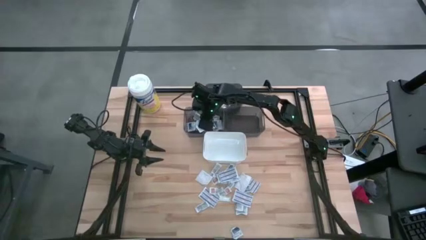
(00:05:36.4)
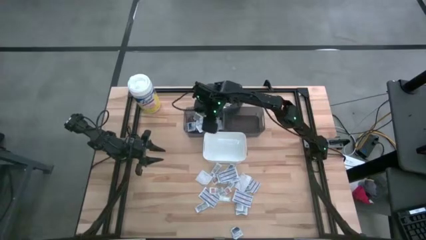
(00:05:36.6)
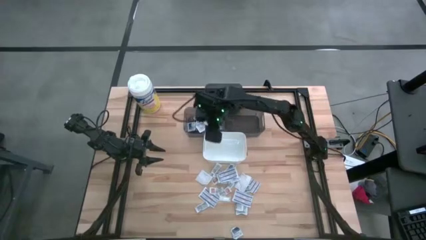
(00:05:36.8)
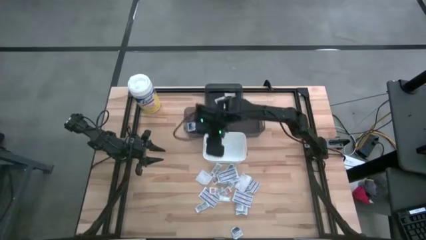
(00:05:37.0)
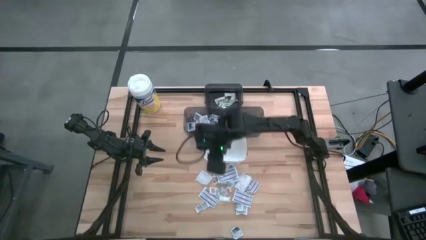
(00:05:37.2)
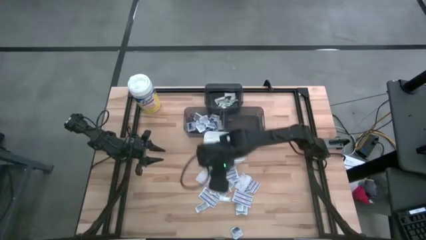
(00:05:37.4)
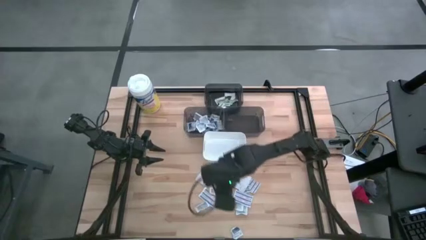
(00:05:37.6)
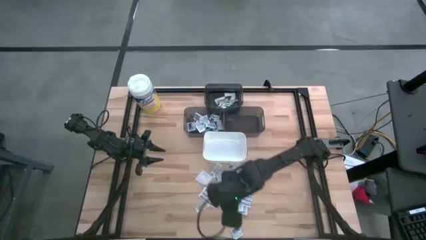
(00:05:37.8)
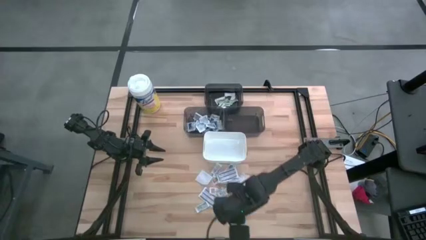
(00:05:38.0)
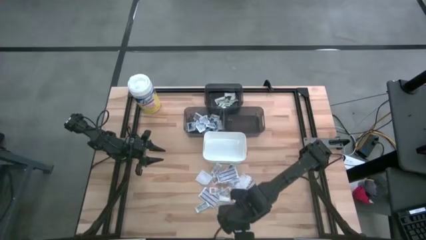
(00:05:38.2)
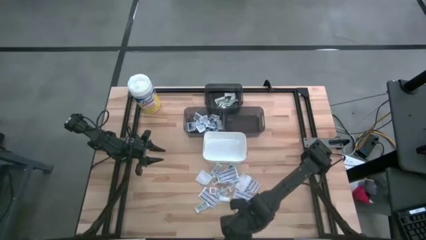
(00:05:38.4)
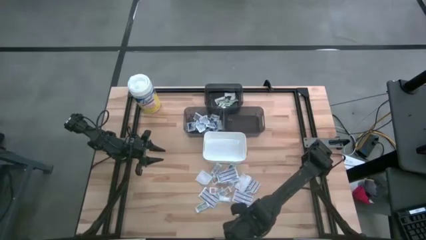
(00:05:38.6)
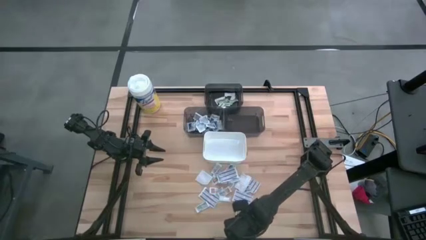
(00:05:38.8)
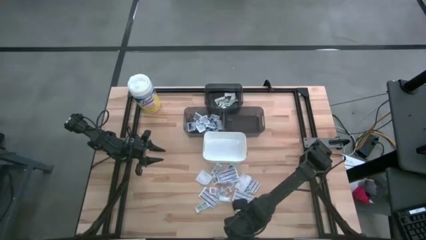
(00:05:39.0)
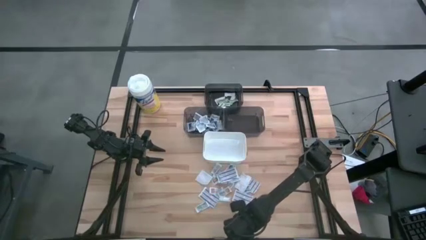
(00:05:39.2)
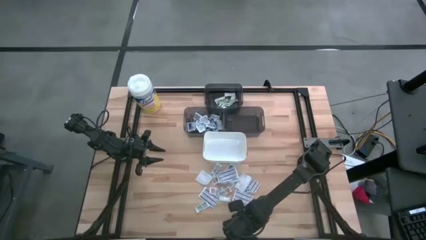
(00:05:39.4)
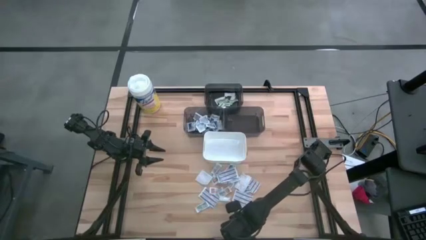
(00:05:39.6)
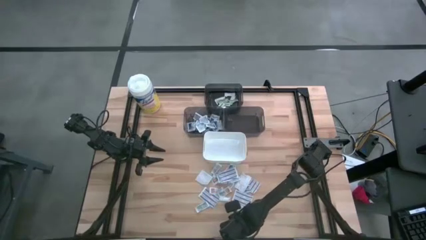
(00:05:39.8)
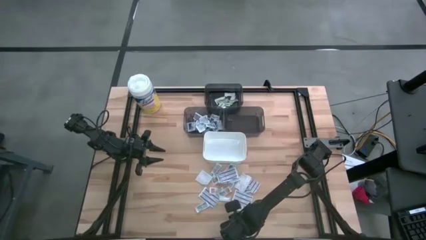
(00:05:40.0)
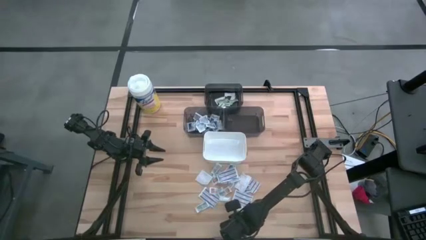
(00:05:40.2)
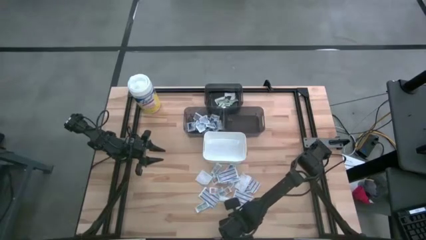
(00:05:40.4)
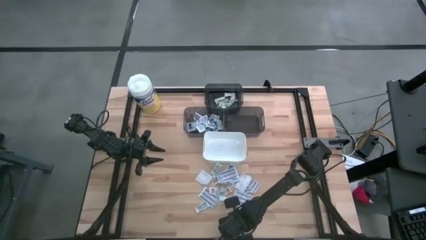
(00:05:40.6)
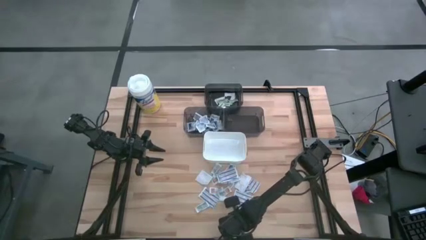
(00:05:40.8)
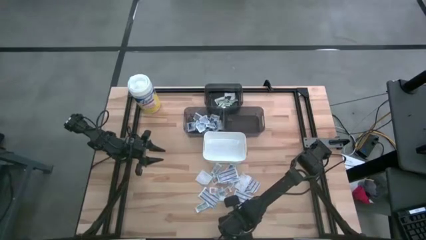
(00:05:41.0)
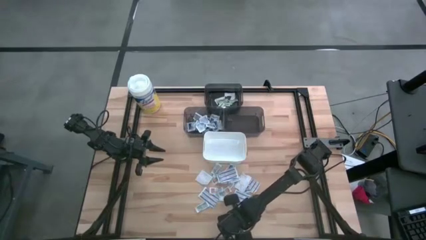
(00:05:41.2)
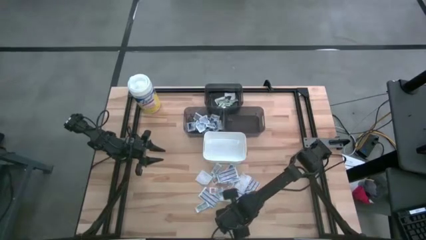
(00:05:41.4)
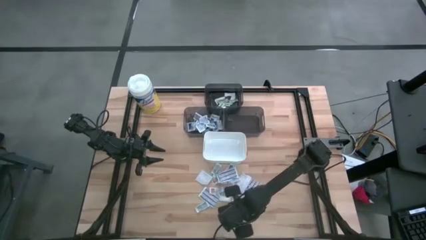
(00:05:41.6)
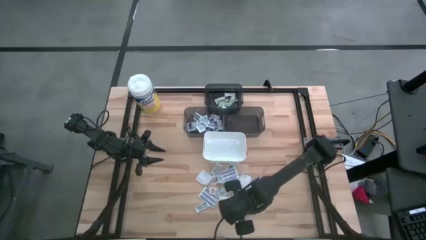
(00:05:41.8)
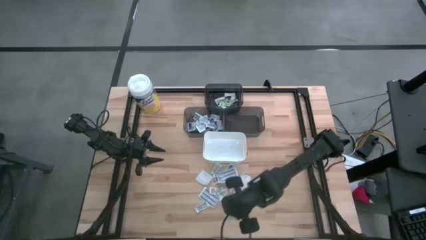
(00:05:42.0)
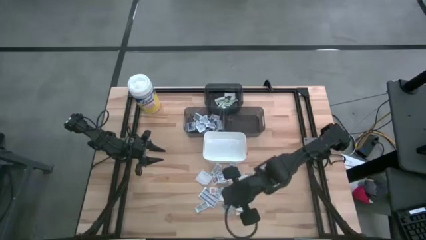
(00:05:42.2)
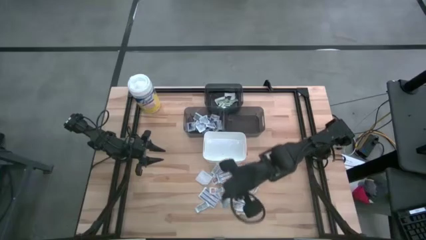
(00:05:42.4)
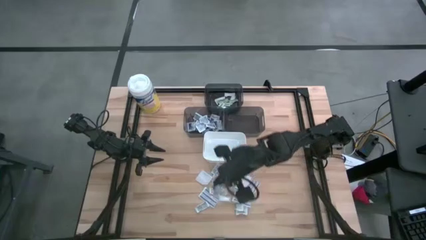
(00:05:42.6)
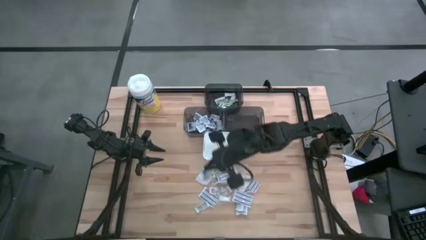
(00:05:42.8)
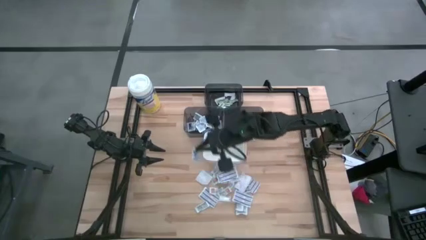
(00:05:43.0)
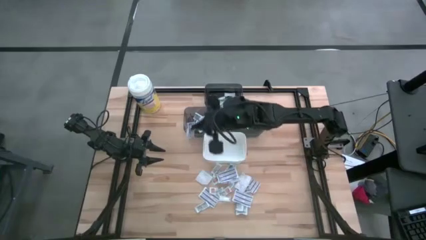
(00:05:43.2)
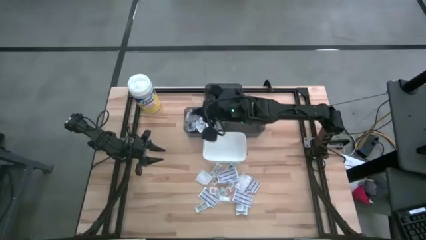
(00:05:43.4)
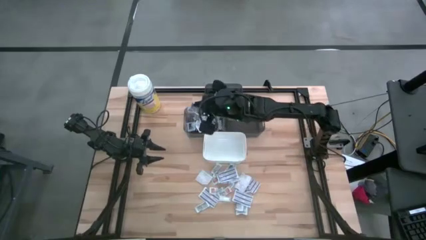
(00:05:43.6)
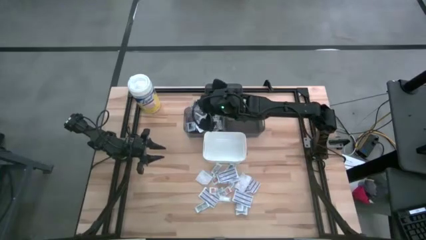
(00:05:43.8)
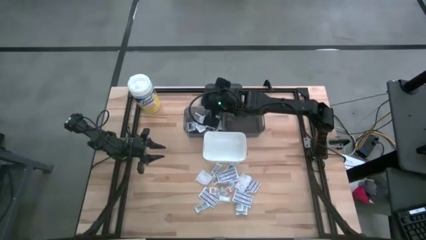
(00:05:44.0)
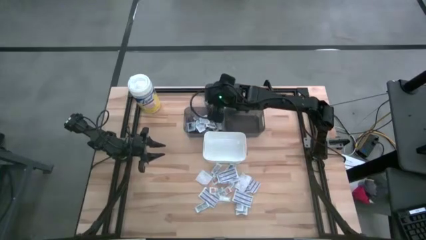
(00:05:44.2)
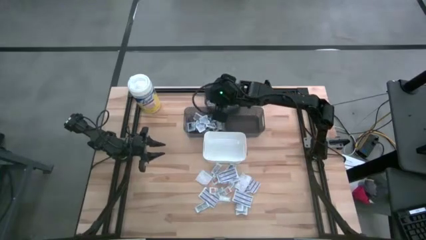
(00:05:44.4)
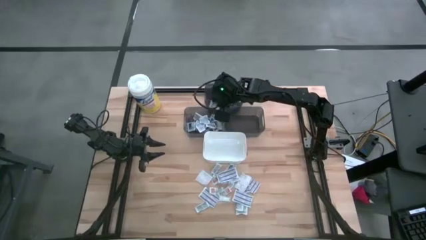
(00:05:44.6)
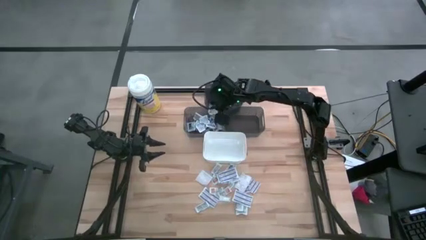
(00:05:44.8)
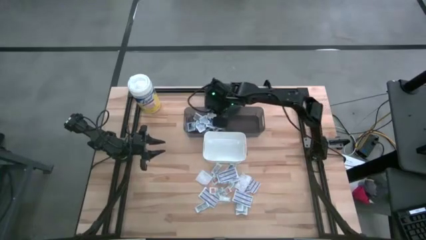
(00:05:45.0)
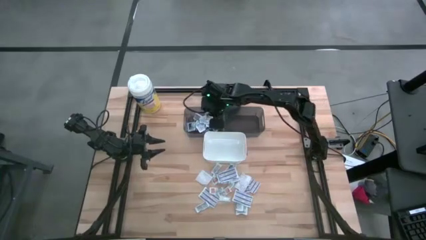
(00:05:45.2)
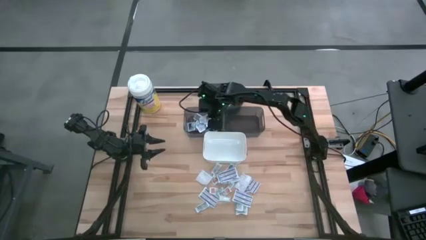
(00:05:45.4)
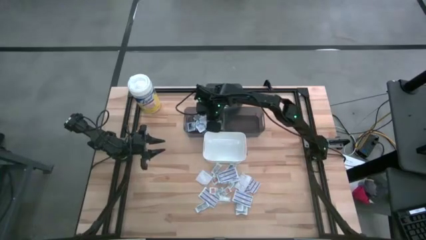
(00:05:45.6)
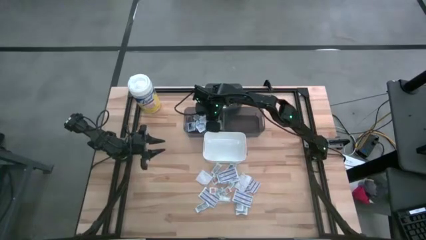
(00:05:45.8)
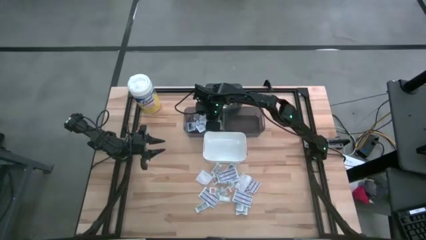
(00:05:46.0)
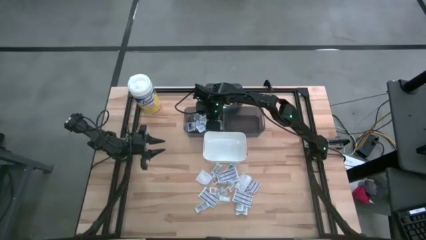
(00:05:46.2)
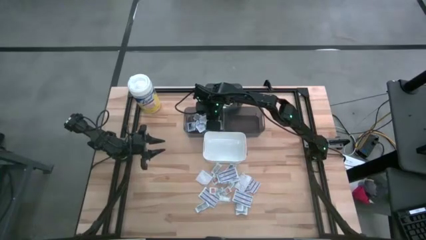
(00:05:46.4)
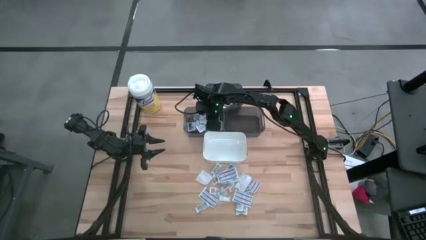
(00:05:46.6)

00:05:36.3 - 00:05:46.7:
Task: Pick & Place First Aid Supplies
Put the alcohol pad into the left black bin

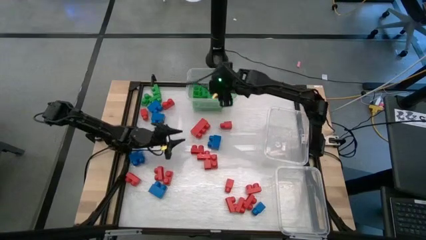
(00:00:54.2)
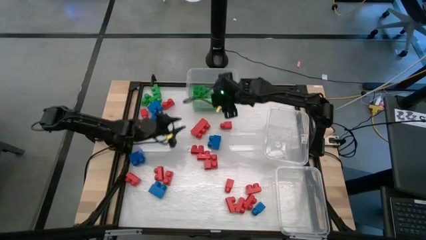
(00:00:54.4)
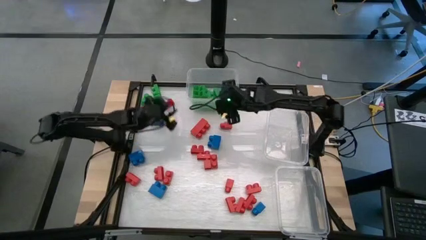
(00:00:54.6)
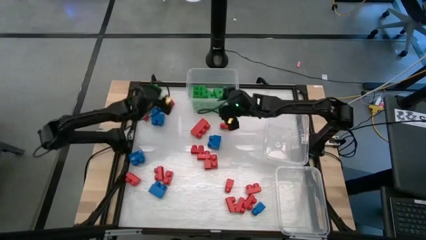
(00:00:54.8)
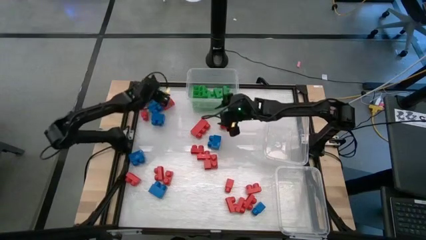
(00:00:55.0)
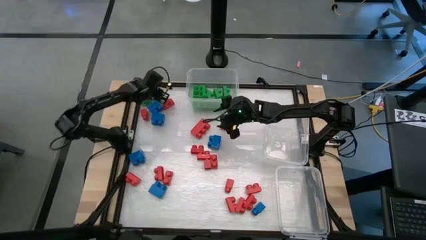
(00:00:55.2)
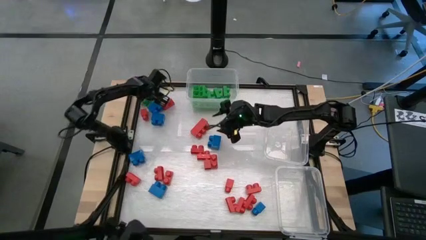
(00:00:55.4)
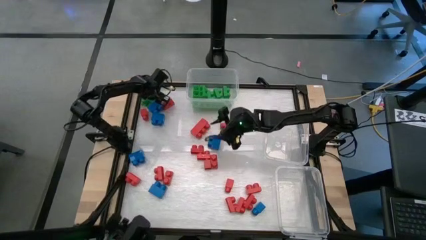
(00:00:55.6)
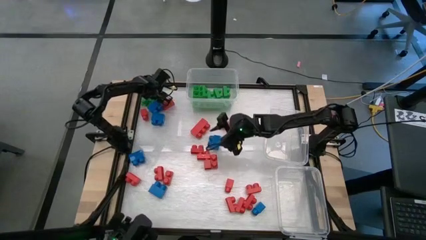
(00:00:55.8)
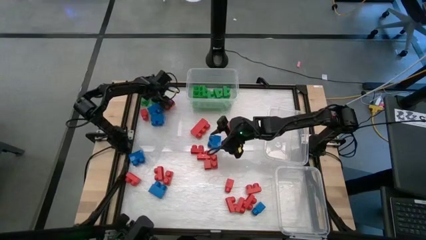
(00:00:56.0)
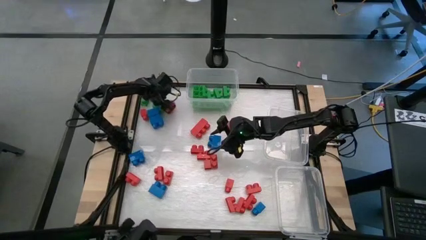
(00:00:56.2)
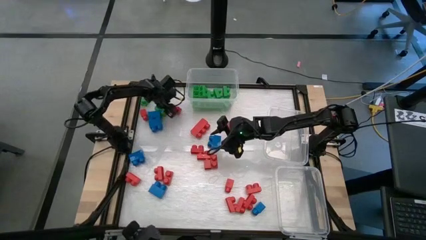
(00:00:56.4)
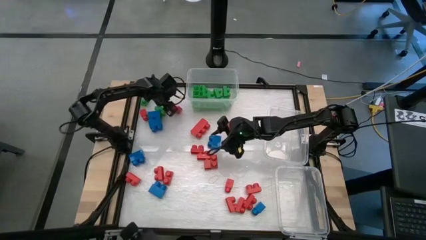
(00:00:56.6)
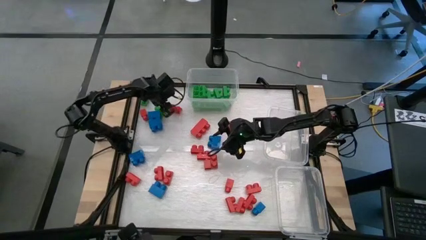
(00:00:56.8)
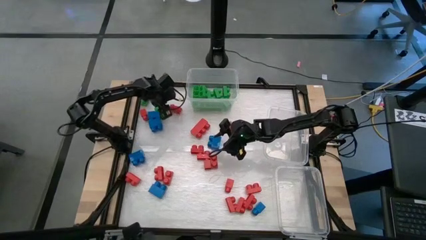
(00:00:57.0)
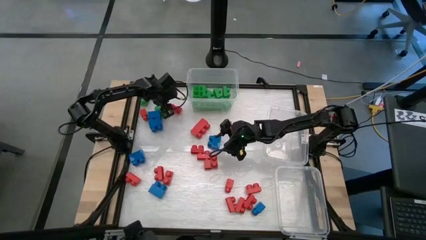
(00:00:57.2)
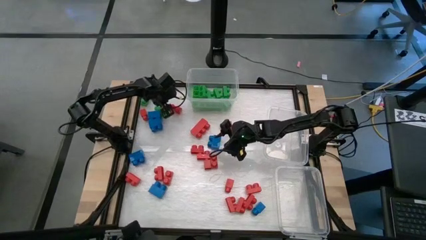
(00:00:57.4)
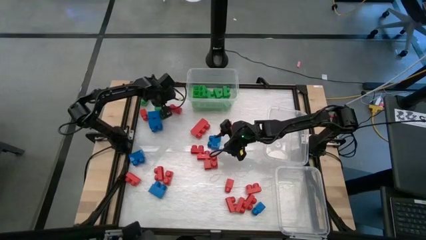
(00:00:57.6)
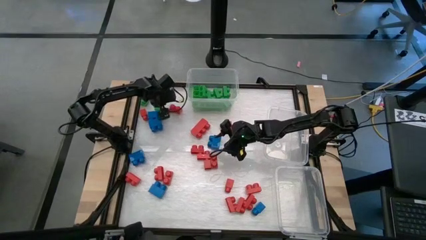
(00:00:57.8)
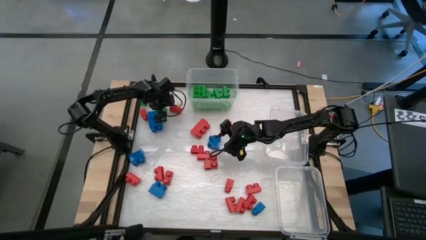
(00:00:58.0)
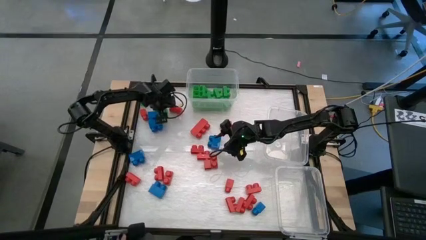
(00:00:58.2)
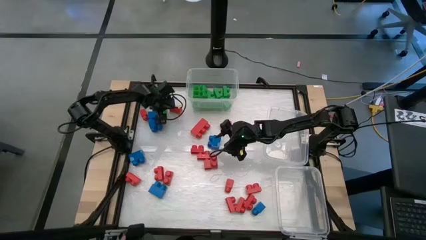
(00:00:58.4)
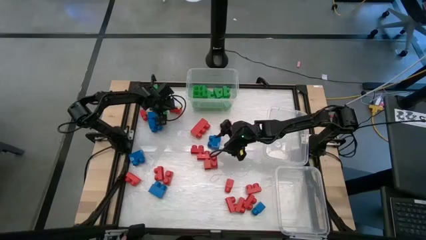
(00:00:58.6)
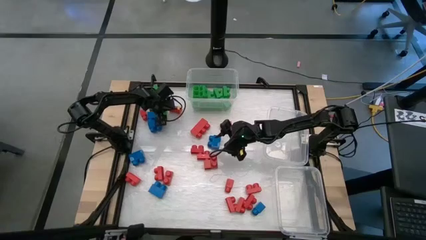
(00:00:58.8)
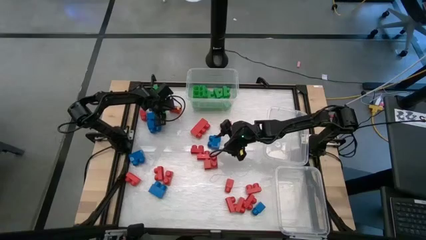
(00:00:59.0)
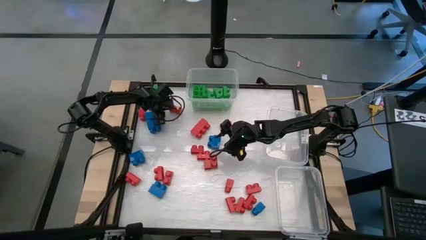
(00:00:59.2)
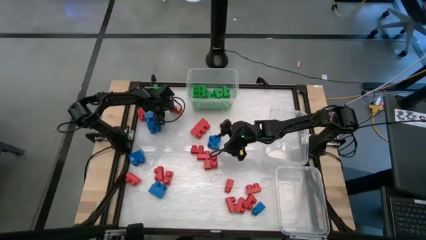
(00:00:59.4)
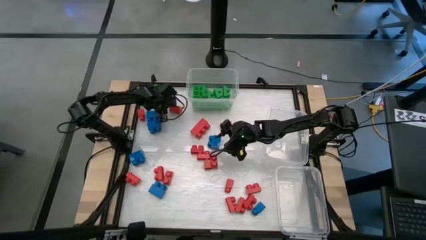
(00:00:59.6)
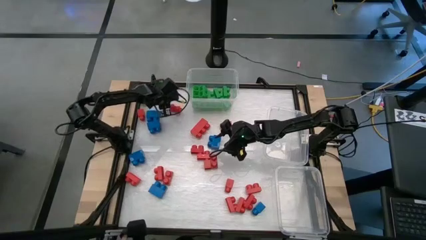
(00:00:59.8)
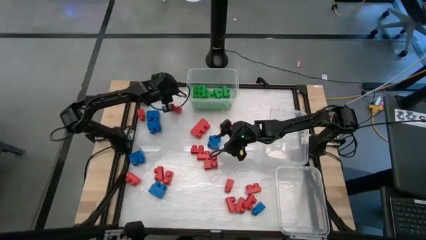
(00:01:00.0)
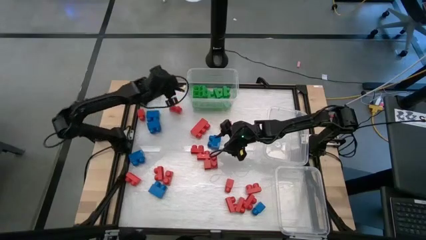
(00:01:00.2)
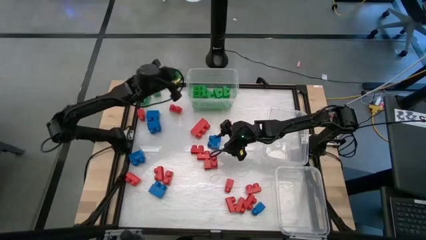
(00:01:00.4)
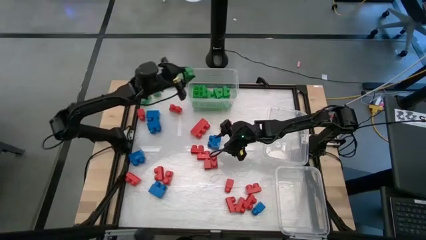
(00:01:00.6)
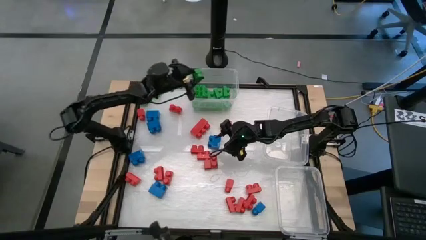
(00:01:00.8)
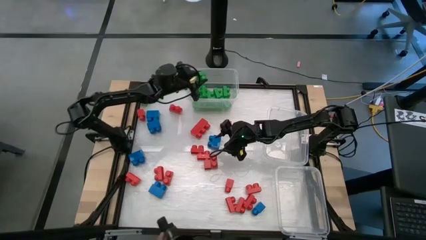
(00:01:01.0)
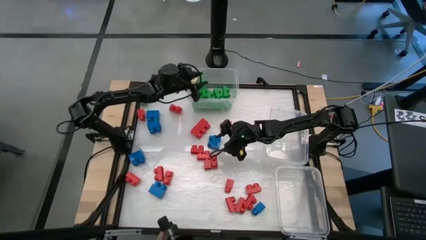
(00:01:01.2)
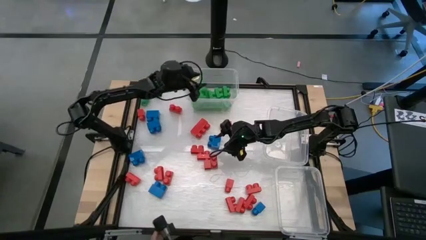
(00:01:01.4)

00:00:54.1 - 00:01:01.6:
Task: Sort blocks
Put the green game piece into the top transparent bin
